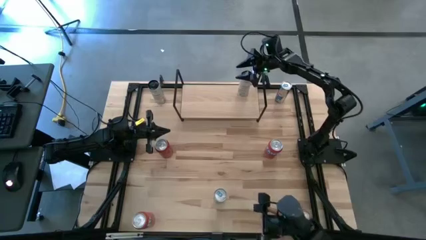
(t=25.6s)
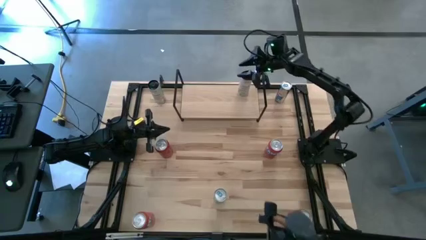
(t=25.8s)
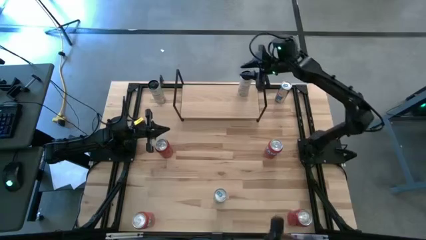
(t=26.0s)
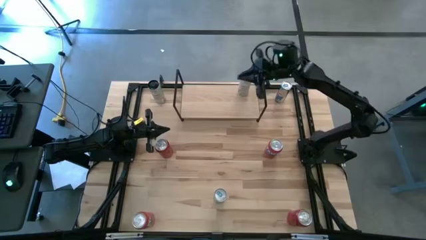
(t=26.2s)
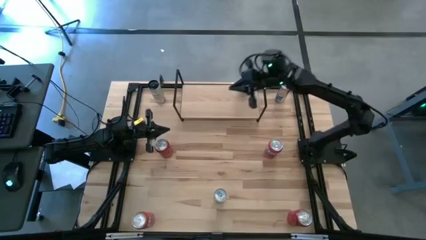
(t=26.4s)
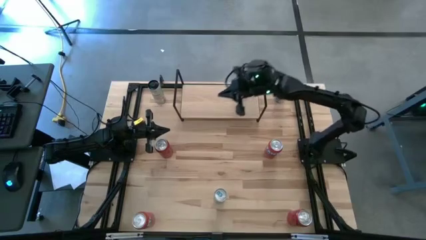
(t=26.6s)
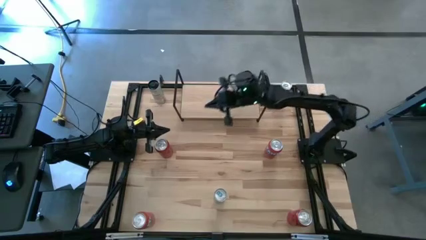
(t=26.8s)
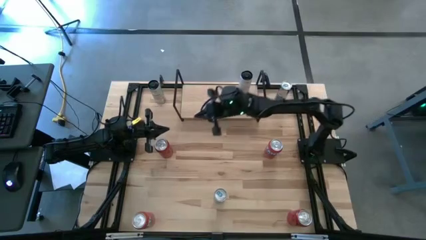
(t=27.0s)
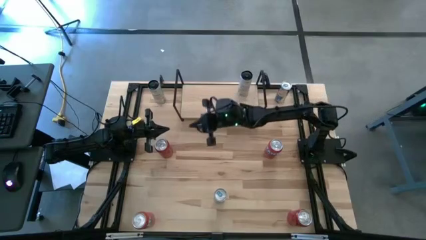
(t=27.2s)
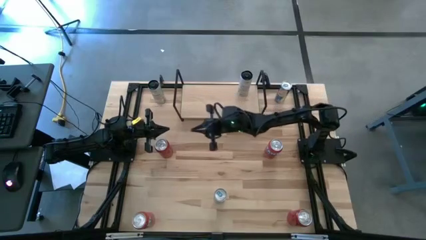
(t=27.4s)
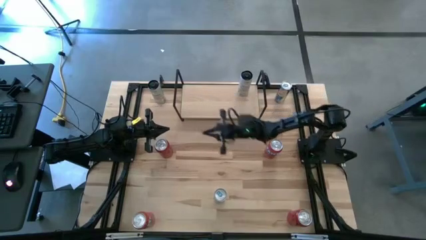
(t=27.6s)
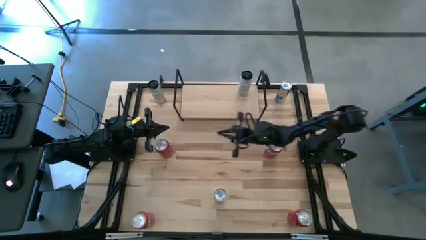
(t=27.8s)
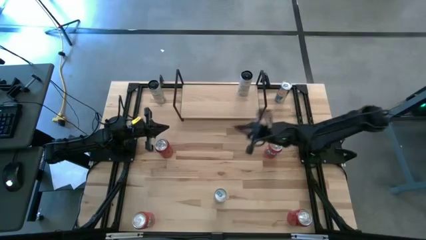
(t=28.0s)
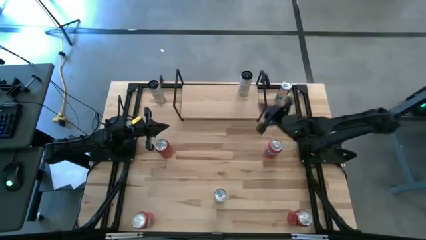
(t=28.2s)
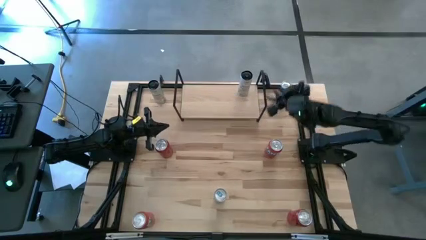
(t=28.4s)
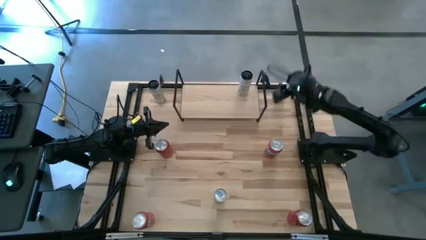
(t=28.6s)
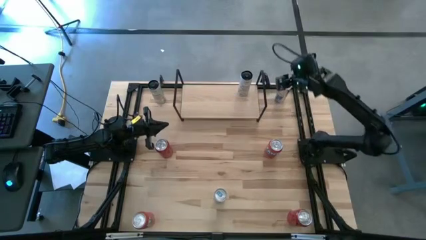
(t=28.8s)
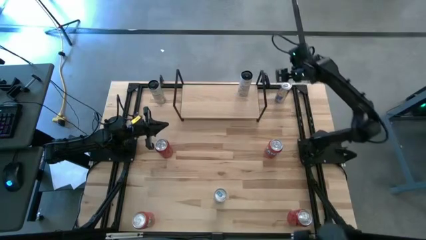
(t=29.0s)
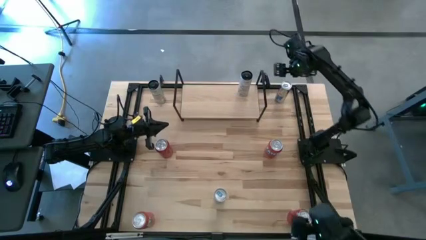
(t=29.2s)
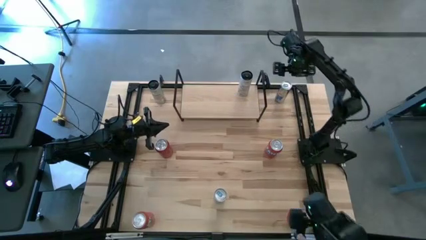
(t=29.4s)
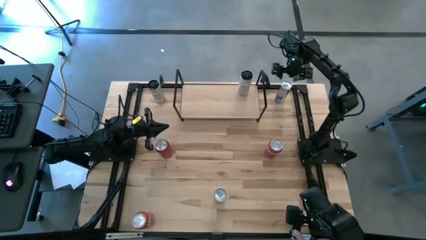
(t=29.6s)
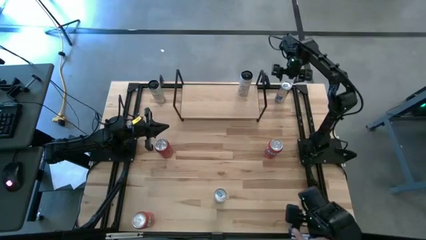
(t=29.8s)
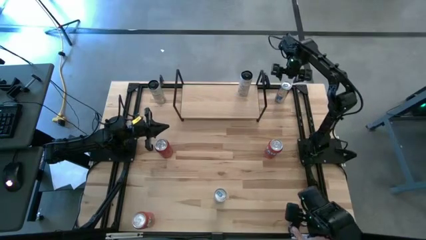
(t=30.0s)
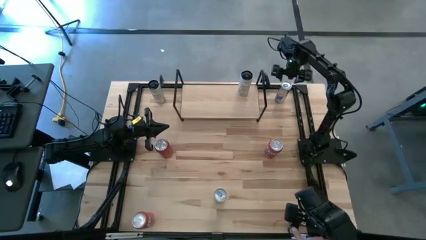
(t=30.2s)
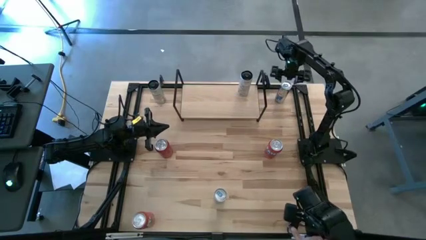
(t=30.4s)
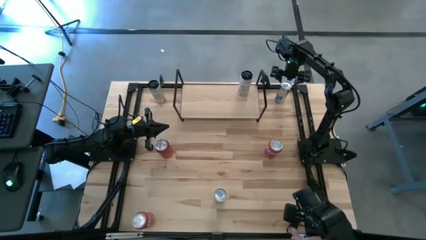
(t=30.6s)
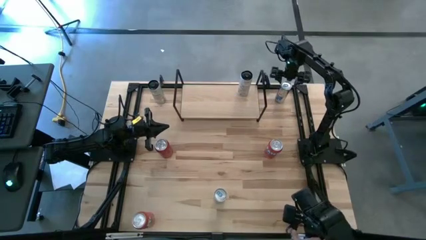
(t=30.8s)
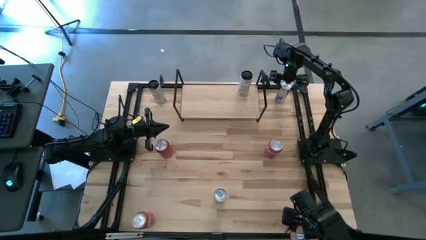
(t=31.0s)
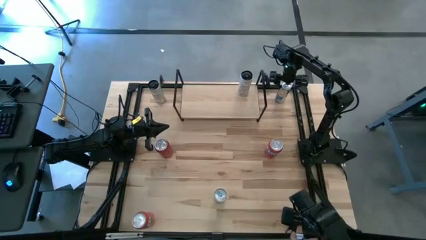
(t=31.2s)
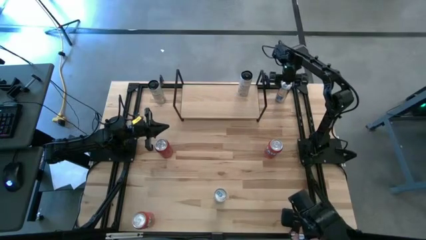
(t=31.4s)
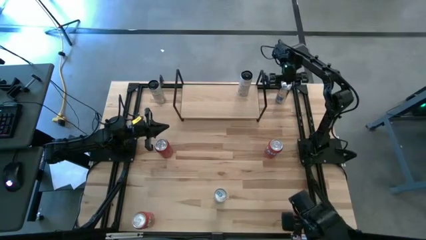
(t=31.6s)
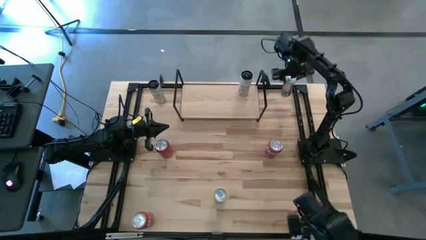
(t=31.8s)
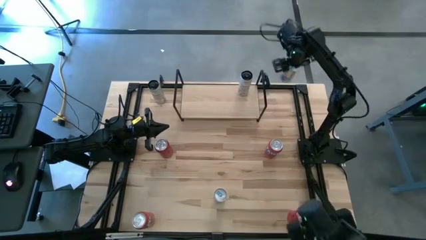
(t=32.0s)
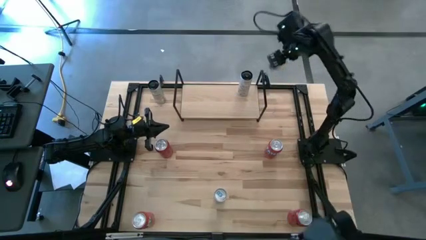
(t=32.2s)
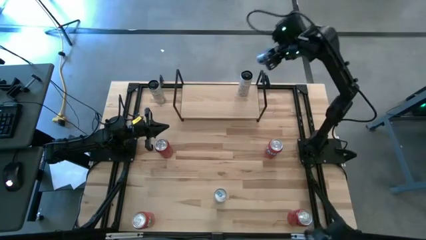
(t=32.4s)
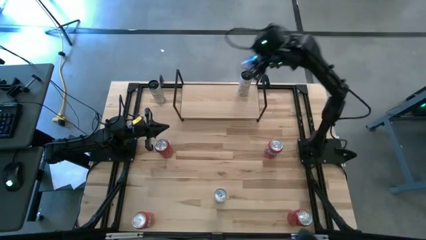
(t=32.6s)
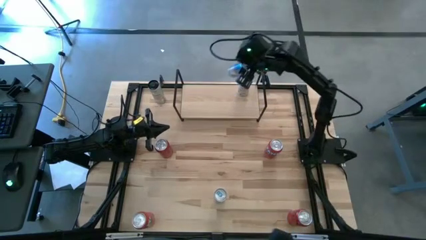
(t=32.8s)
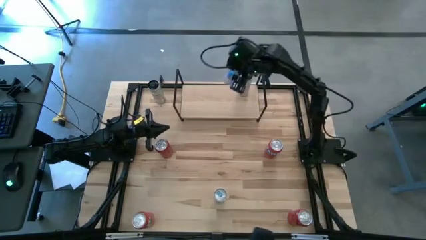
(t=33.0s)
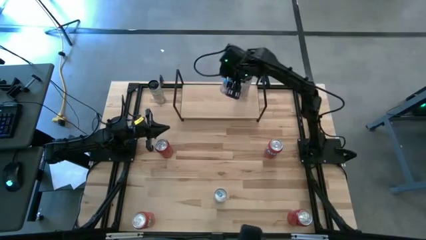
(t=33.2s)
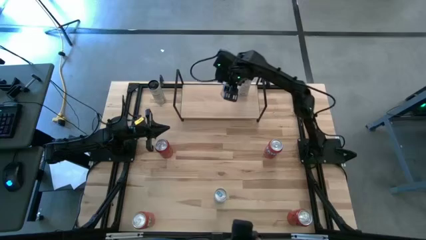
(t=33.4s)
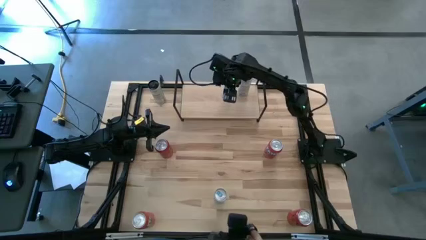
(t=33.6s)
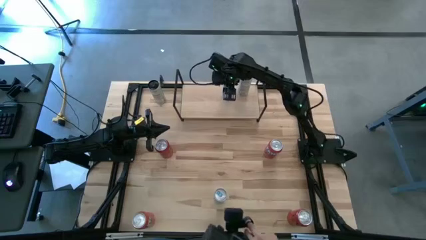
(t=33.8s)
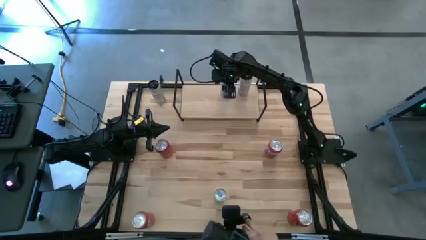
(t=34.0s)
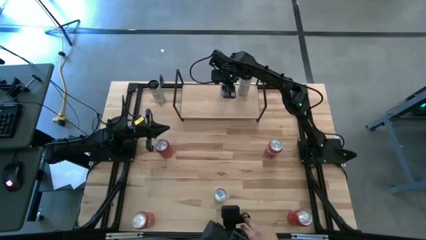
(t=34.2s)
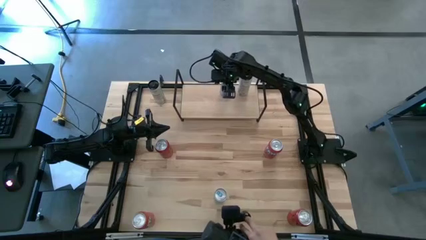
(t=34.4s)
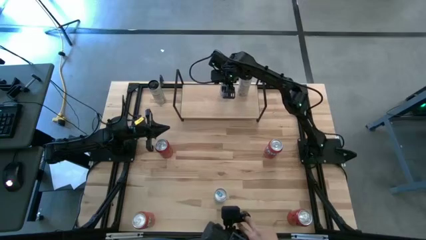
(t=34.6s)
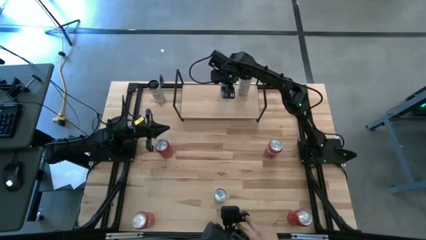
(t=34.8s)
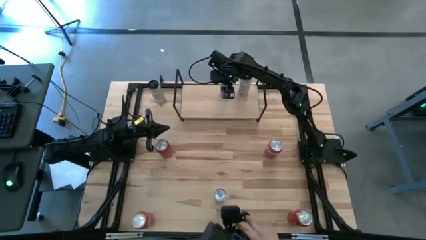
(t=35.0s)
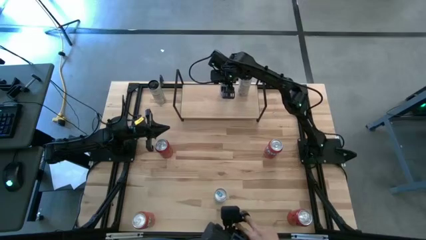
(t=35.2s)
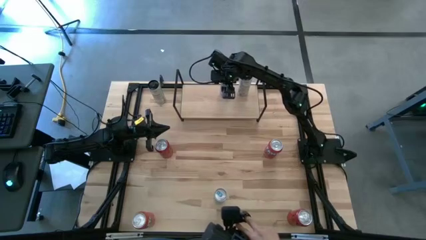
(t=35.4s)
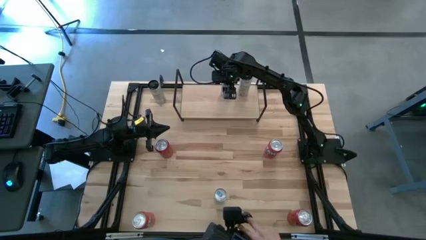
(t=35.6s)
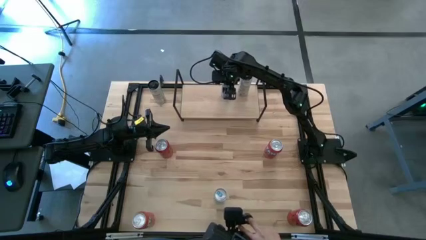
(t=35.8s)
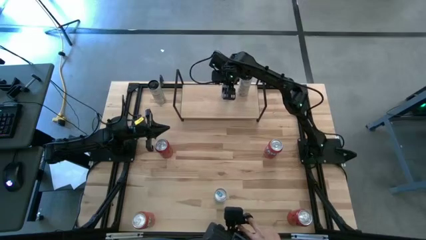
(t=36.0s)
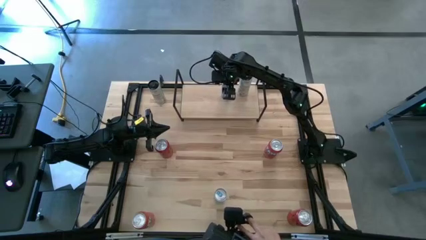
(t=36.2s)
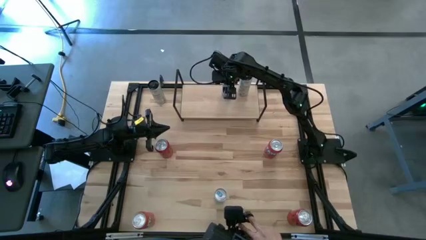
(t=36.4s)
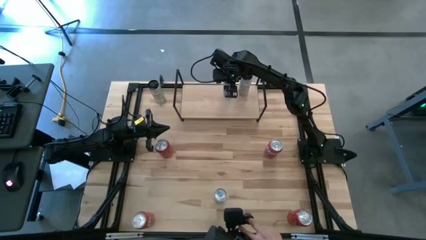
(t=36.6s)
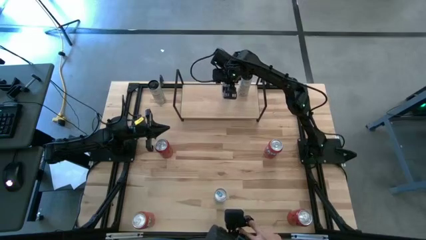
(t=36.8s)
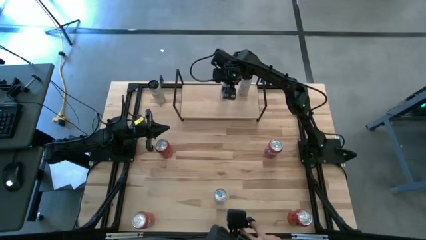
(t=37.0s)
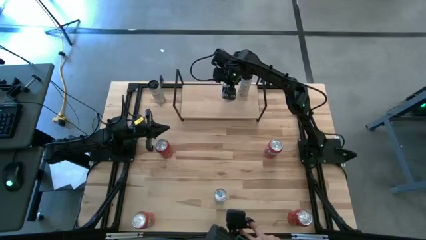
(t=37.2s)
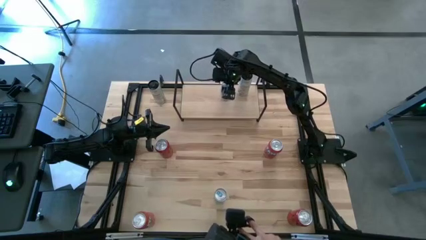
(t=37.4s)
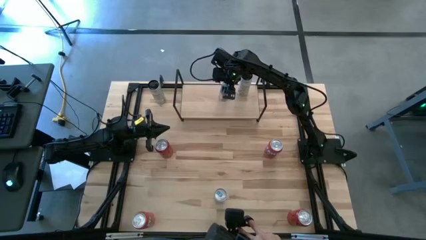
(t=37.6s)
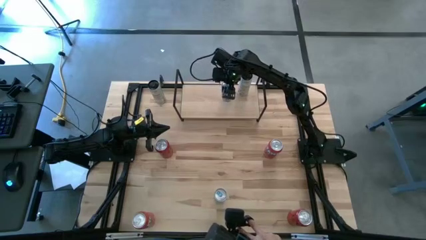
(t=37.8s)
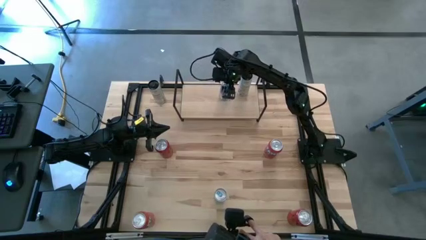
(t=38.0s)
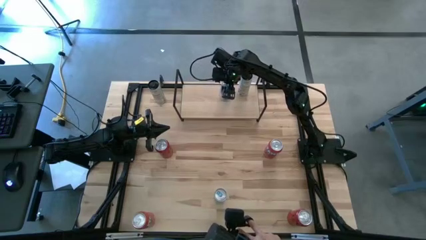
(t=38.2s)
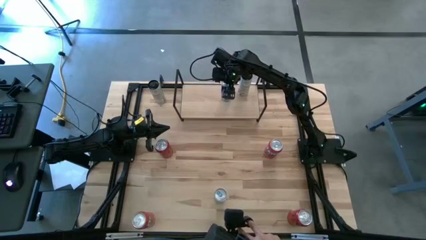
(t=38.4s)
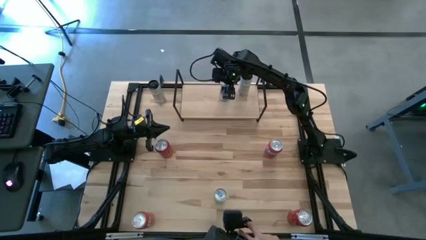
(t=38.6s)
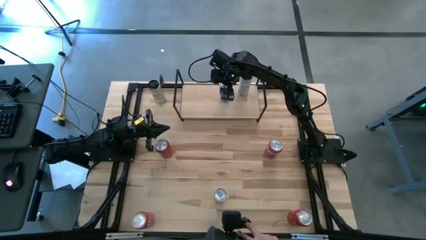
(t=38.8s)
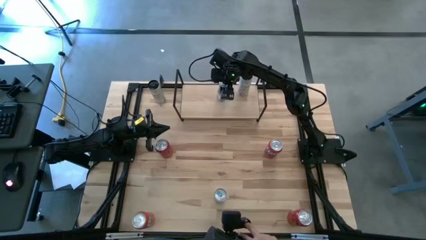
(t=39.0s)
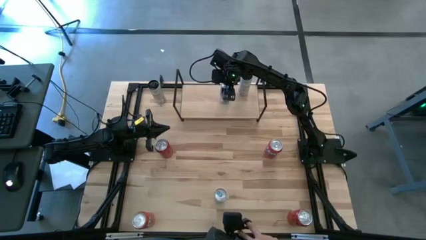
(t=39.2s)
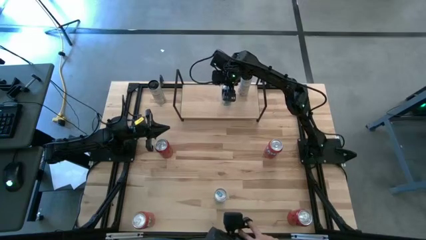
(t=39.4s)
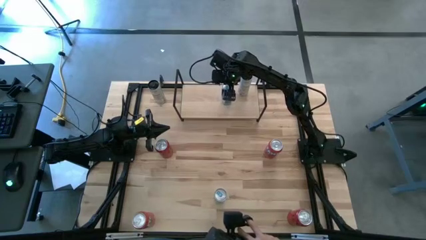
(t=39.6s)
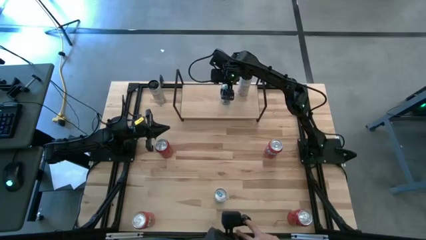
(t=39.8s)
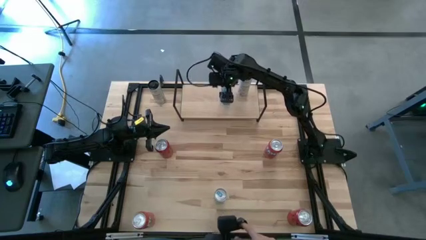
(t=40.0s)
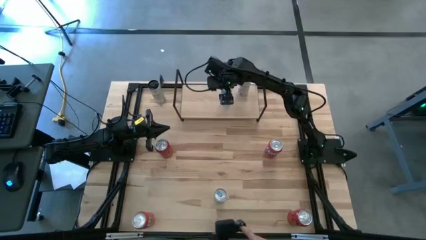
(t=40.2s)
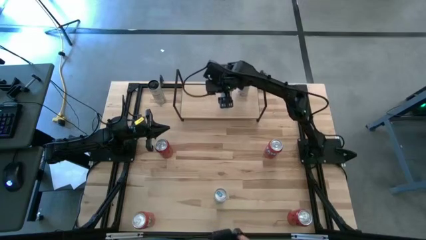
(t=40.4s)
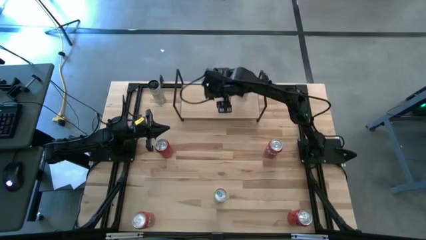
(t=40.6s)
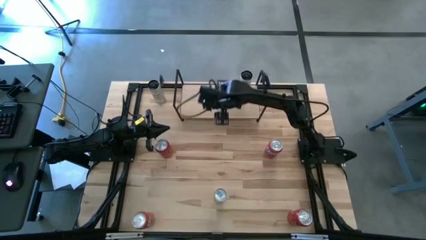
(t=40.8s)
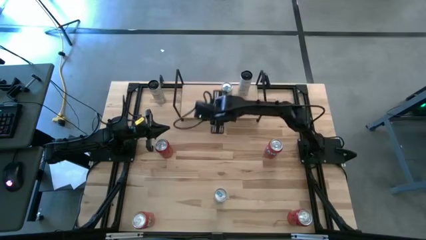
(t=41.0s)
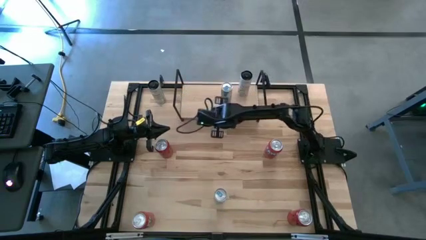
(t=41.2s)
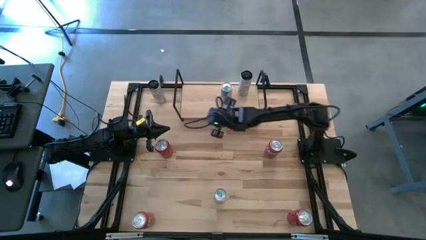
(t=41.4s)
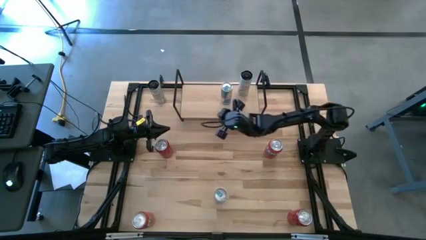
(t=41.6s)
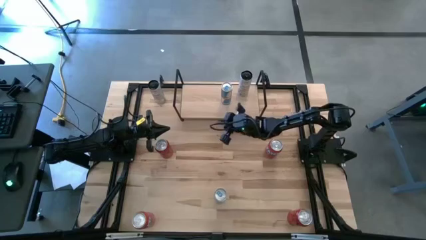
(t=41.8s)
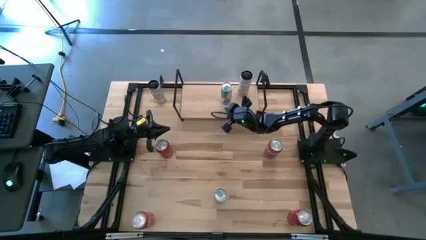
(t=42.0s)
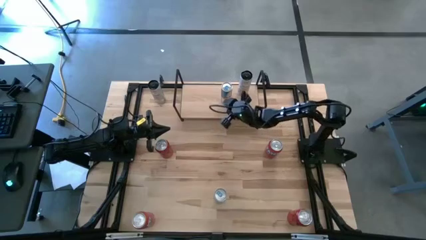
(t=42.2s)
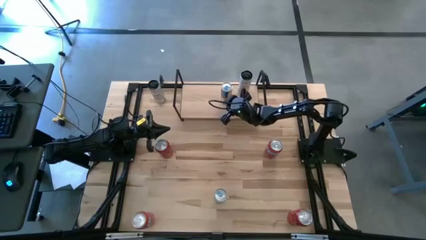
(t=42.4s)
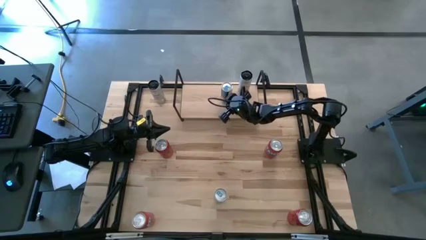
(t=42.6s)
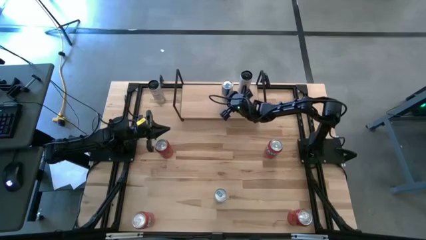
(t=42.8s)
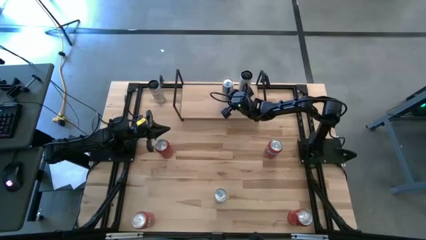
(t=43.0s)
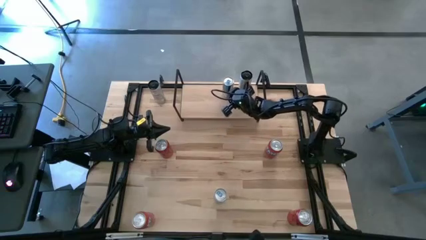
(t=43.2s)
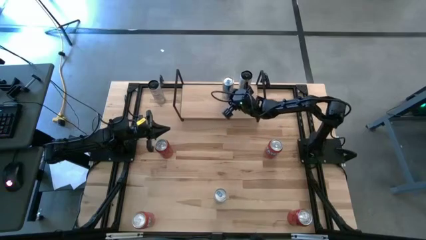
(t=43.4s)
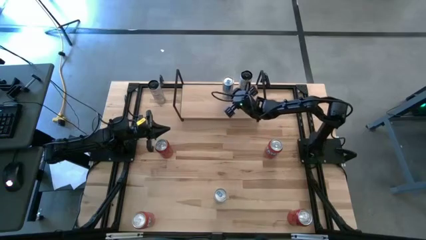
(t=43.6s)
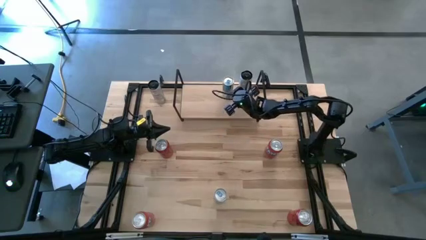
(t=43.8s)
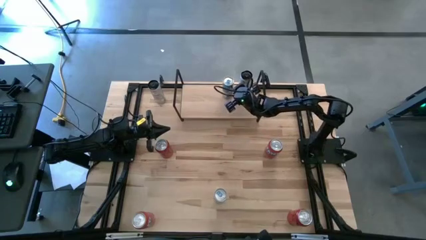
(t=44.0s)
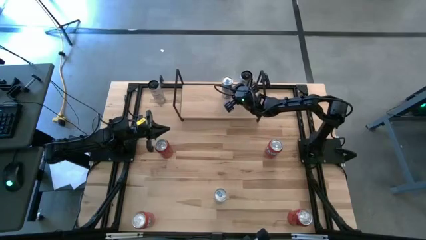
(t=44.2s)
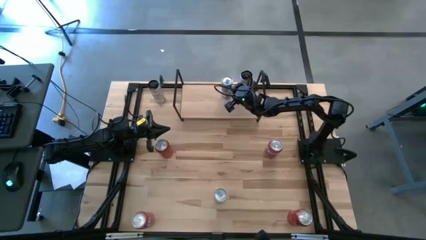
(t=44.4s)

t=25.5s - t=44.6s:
Task: Place canned beverage on shelf
Put the top blue soda can on the shelf
